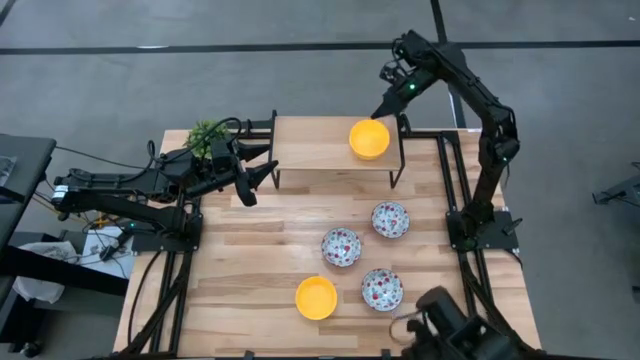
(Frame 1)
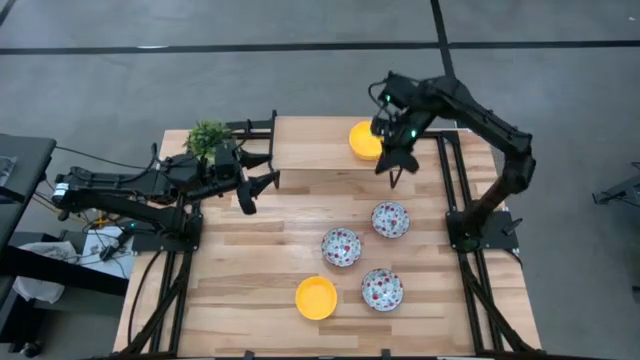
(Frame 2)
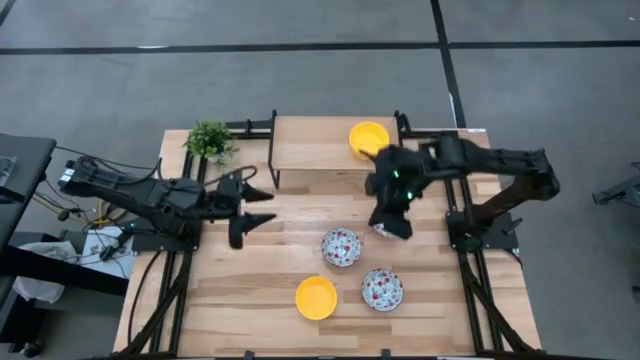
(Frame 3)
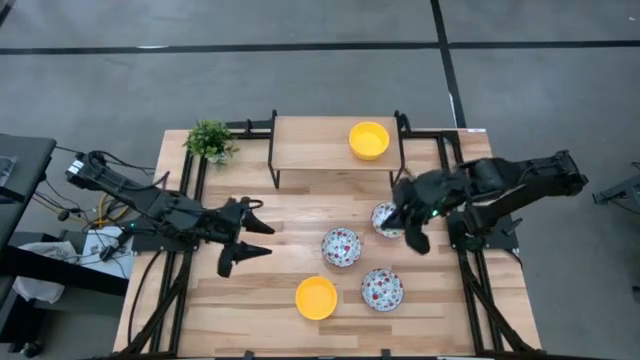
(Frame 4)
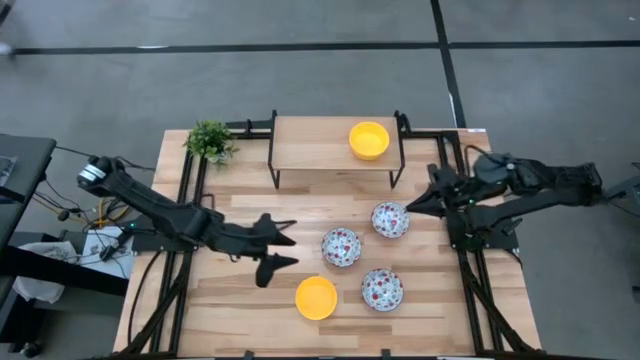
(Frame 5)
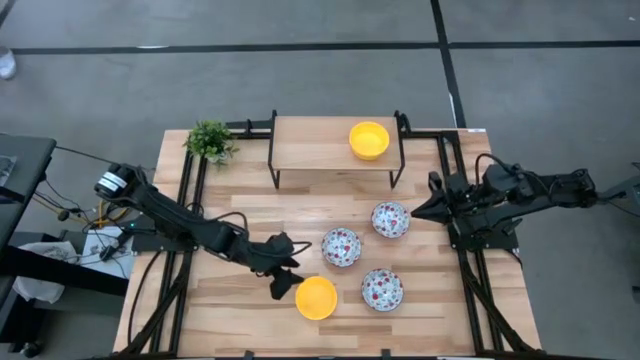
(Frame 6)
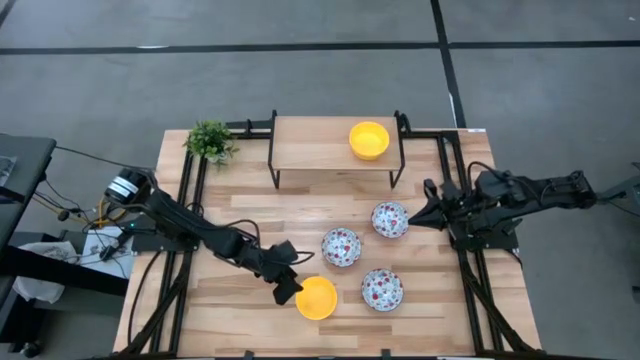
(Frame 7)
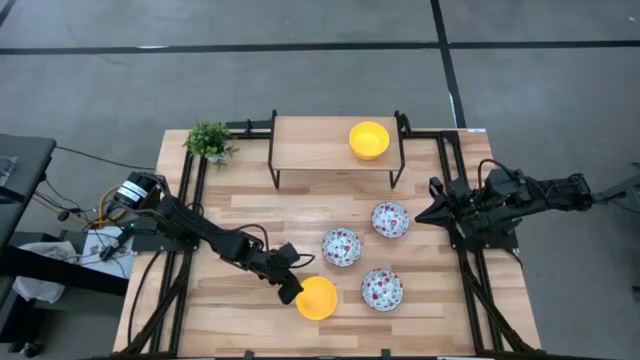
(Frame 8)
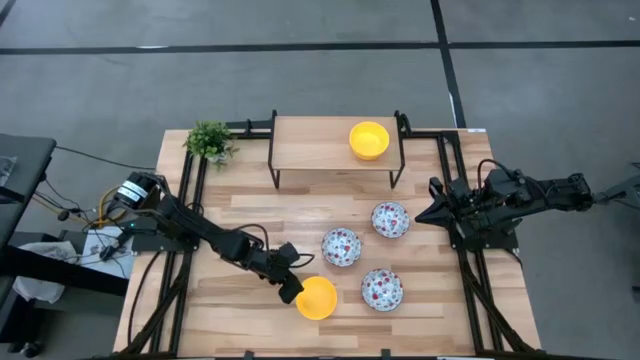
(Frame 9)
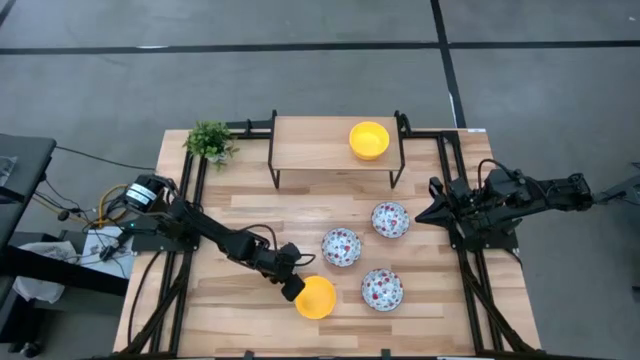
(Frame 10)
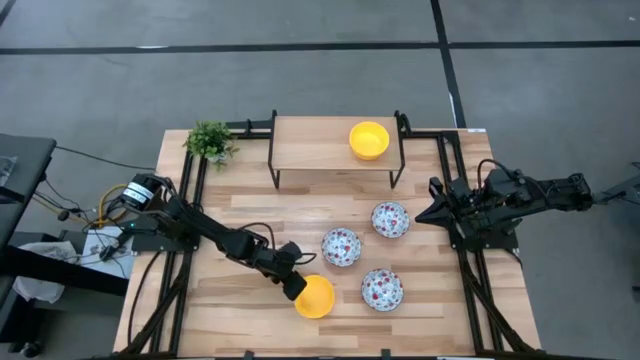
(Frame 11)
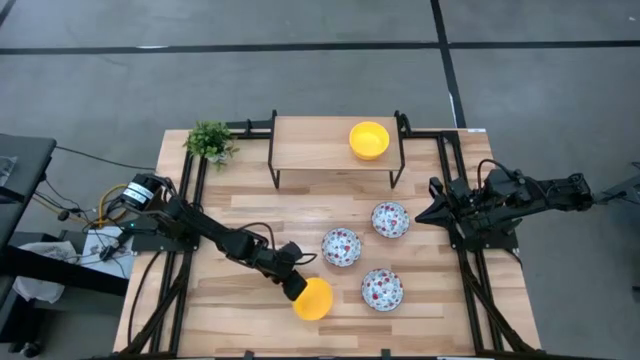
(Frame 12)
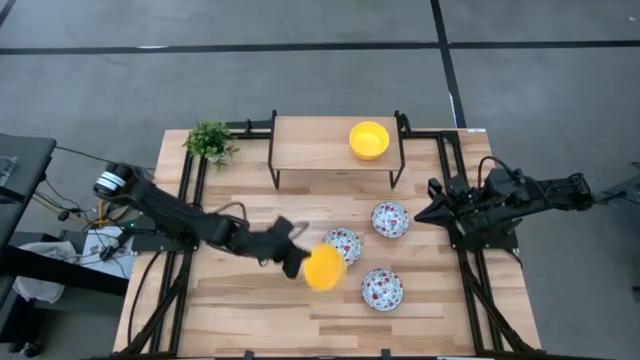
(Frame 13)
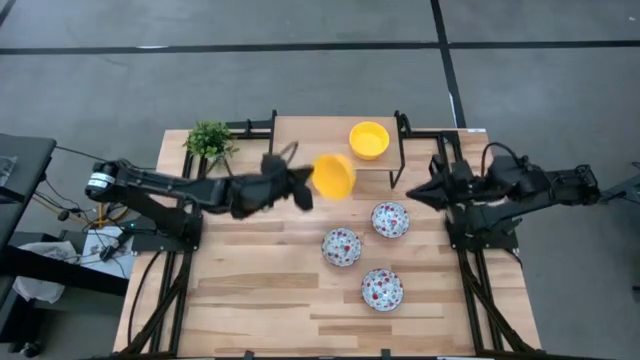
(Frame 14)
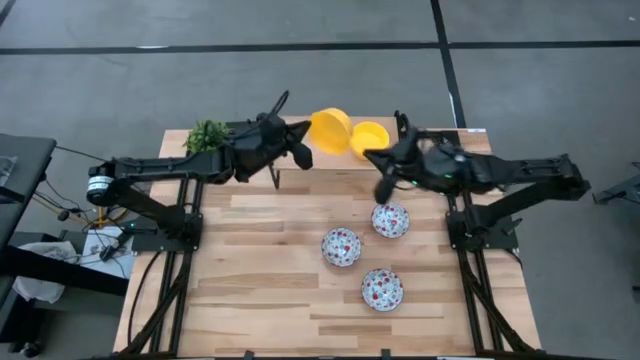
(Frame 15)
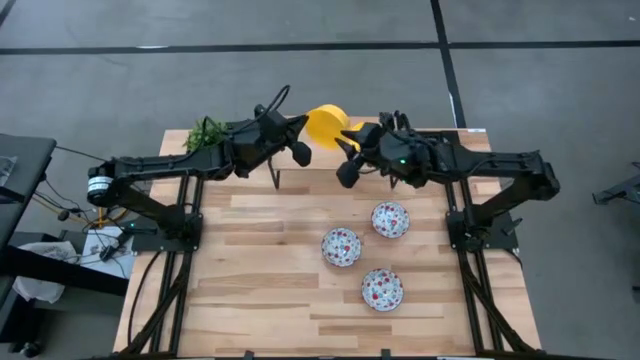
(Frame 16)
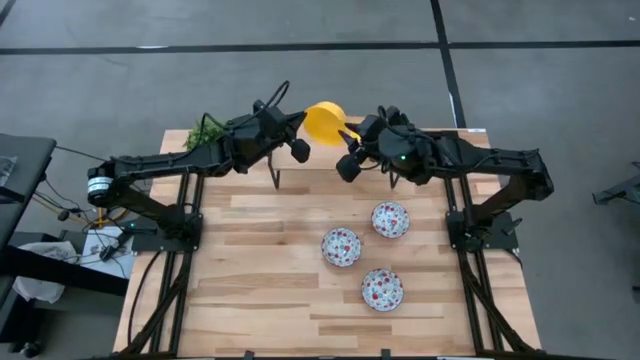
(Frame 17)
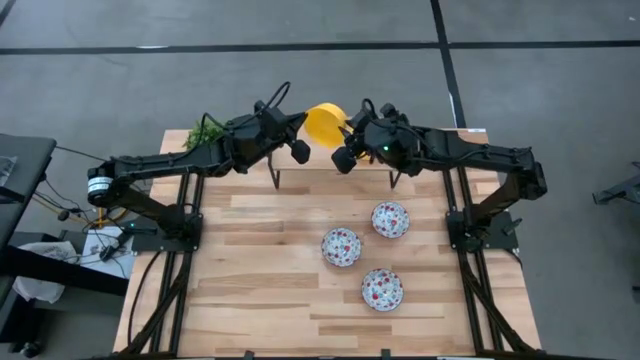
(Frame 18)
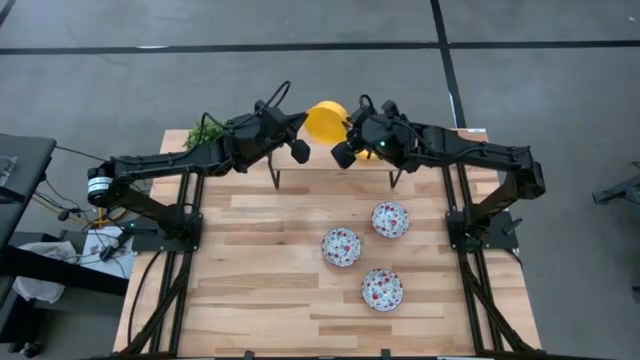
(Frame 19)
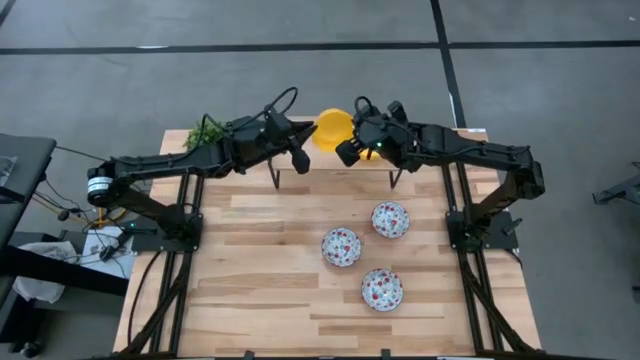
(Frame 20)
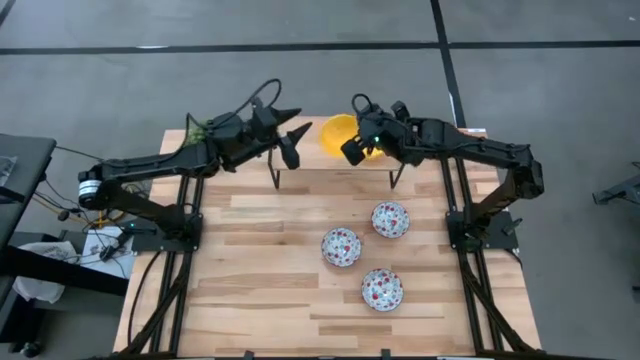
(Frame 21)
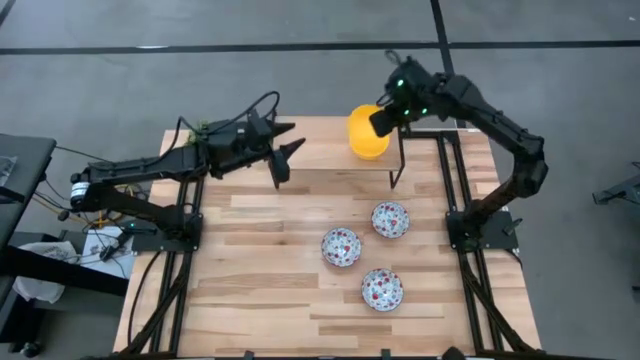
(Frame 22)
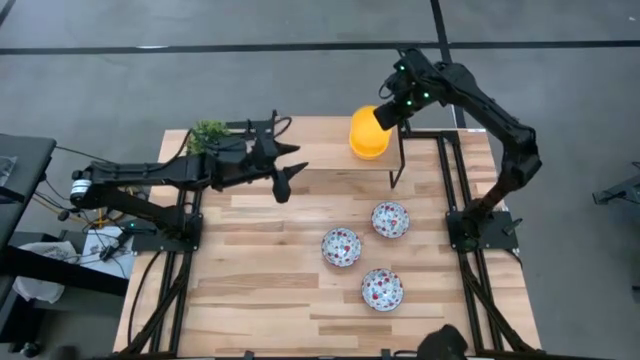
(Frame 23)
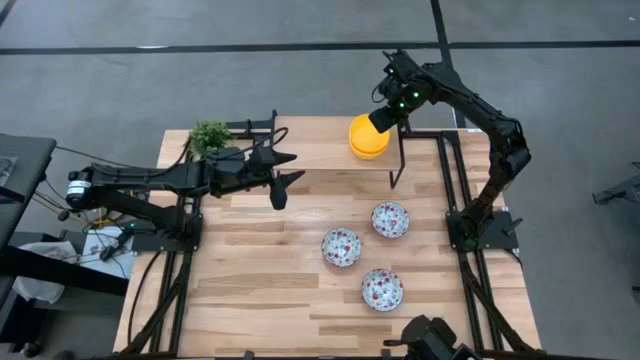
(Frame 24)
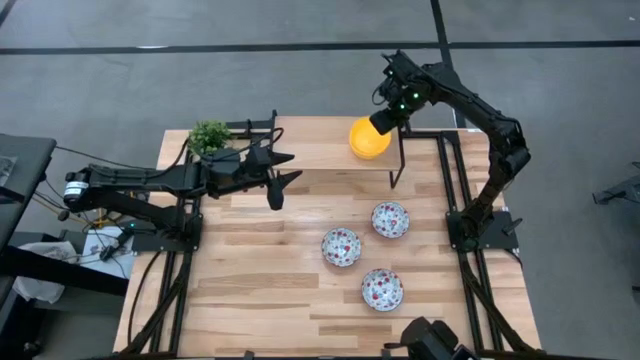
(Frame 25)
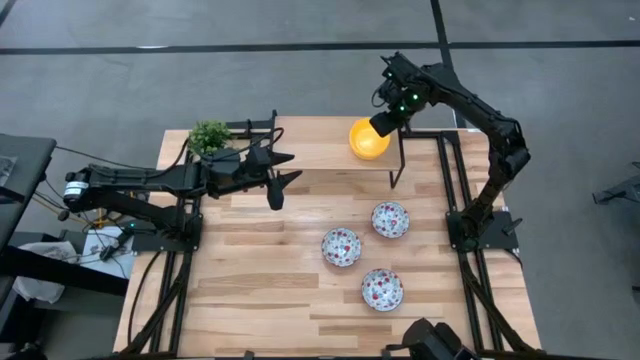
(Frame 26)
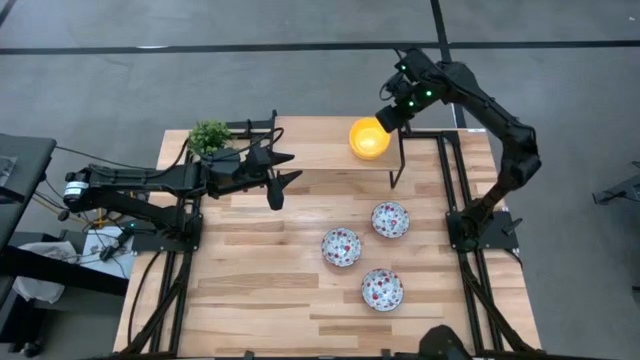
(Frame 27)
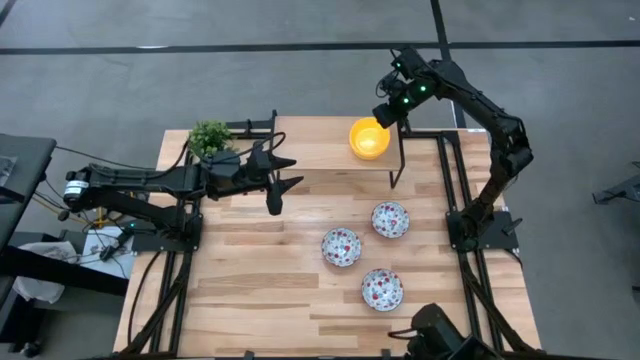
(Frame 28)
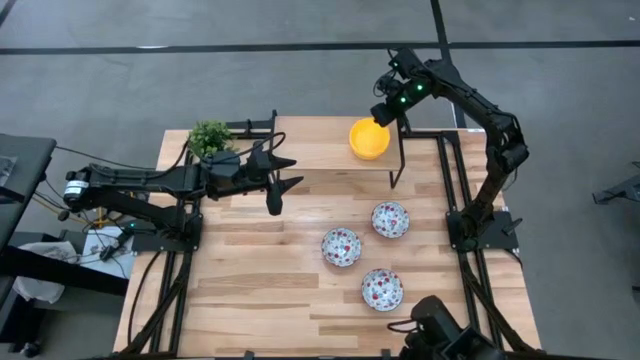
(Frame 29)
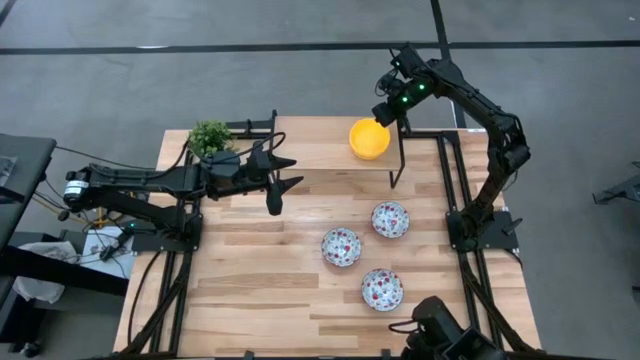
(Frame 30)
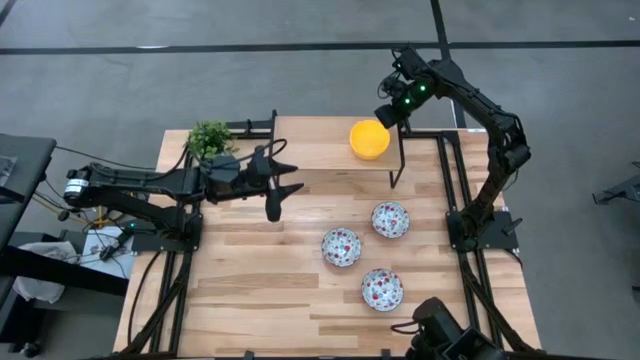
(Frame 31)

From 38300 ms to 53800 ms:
Task: Pick & Place Mini bowls
Stack the yellow bowl on the yellow bowl on the shelf
